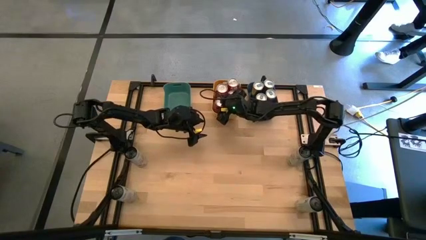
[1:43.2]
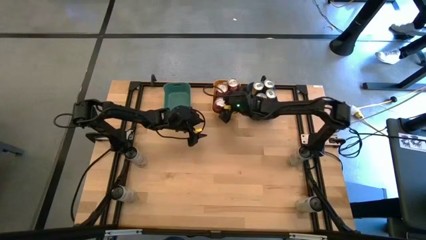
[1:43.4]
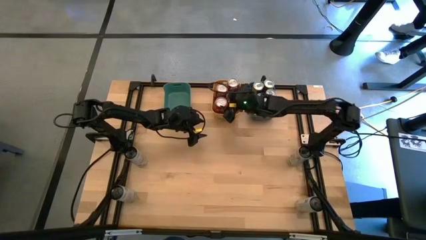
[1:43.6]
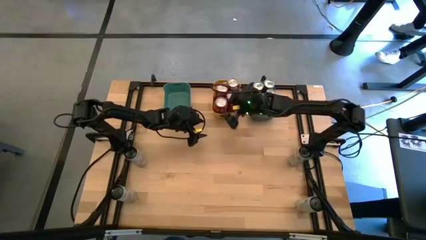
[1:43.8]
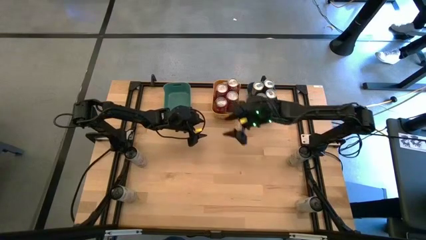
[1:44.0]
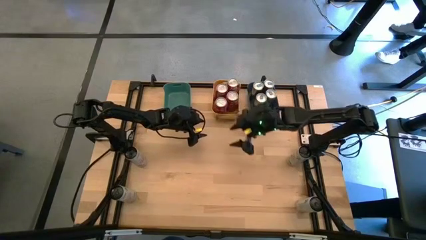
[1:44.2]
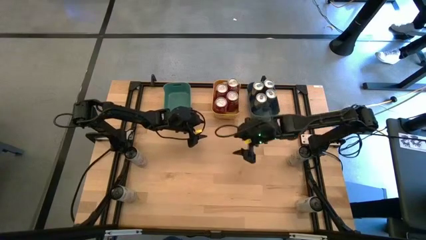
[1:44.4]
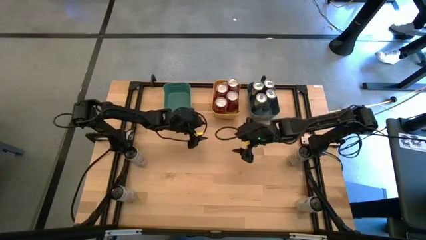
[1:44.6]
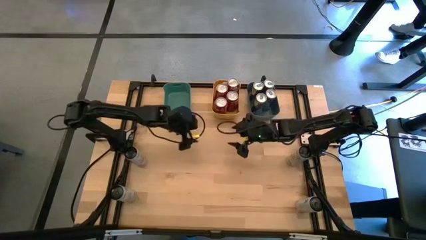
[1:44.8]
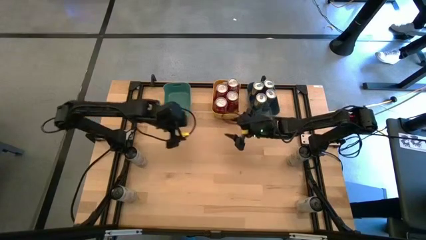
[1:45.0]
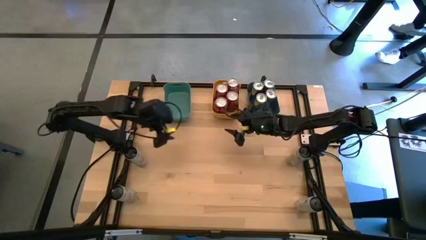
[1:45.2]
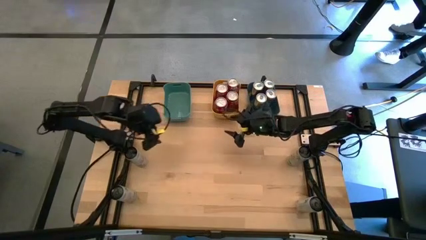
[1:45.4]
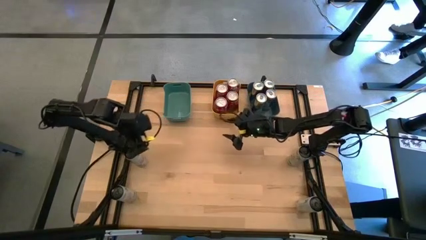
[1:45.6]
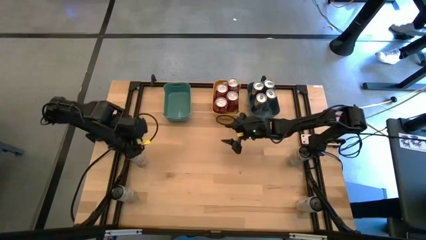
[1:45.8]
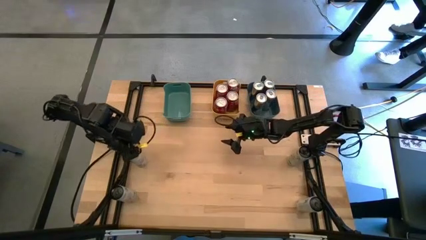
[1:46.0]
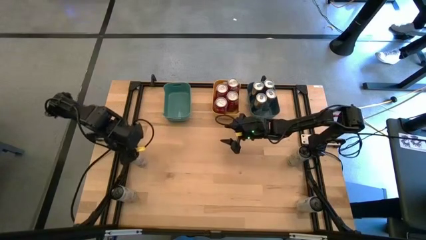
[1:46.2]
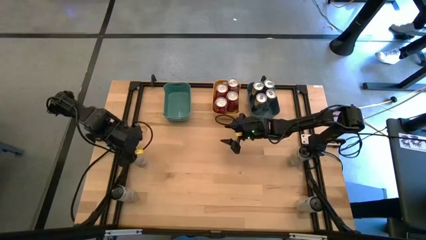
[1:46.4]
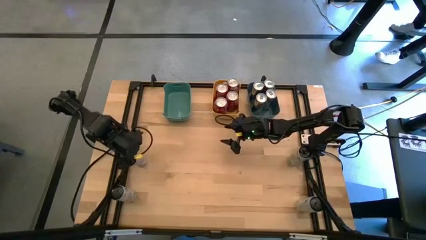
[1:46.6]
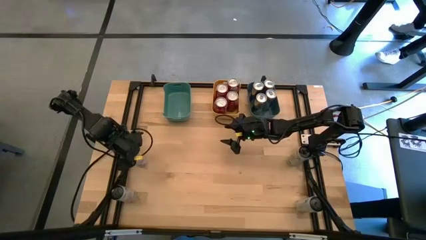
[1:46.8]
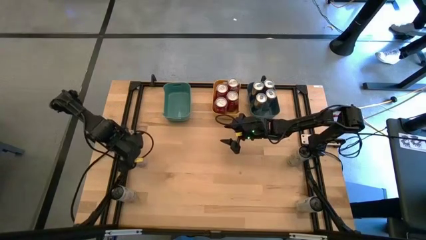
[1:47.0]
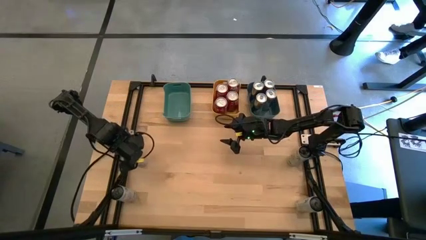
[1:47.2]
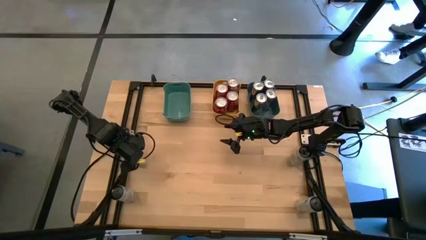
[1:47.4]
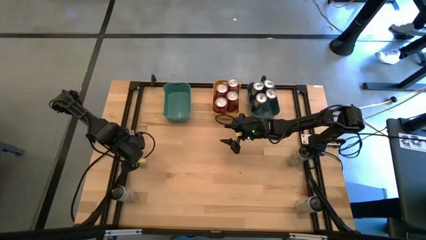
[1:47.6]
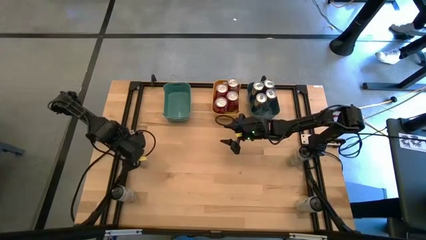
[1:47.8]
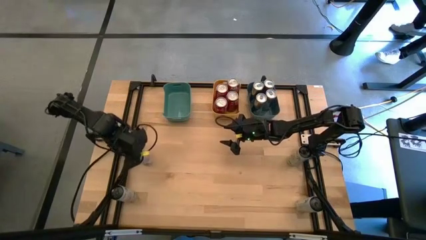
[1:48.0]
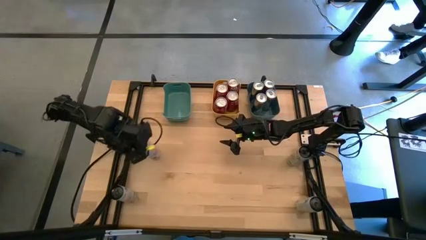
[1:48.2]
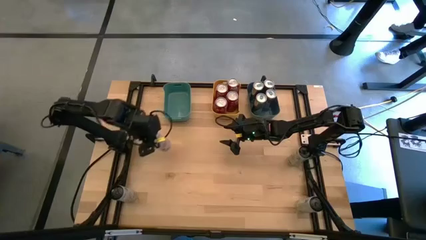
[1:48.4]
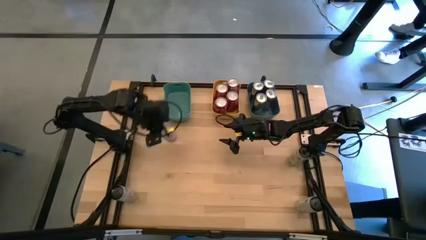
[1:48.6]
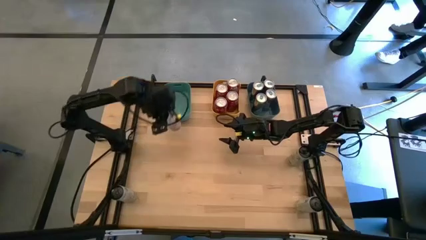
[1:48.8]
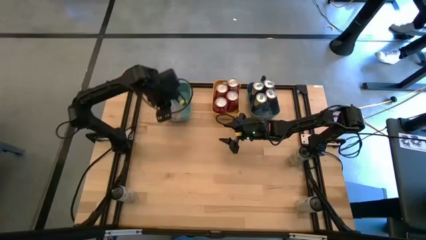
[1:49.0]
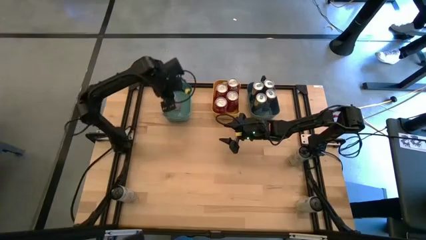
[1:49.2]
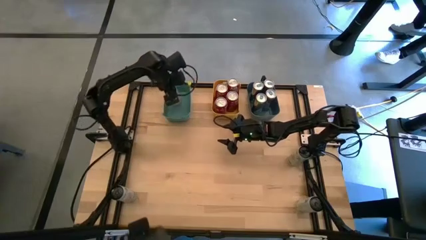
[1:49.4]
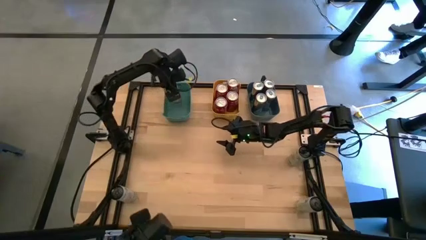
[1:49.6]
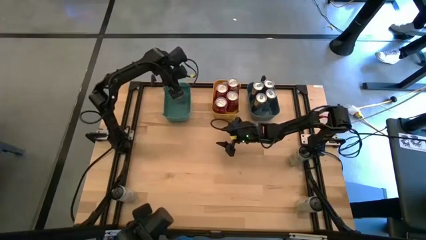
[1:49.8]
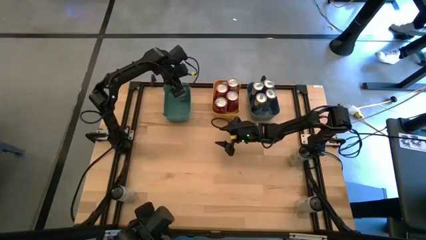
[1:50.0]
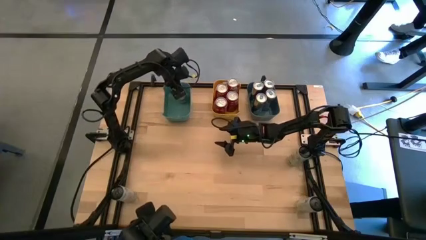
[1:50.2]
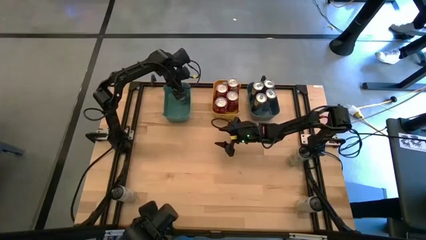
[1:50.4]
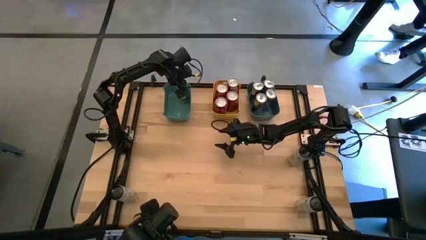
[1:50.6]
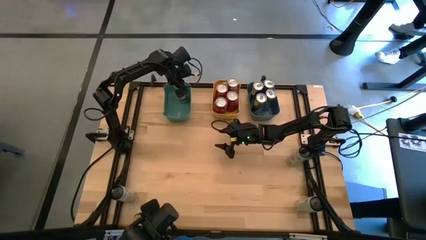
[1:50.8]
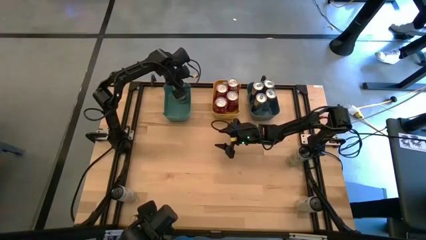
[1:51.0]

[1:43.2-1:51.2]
Task: Sort soda cans
Put the top left white pink soda can into the green bin

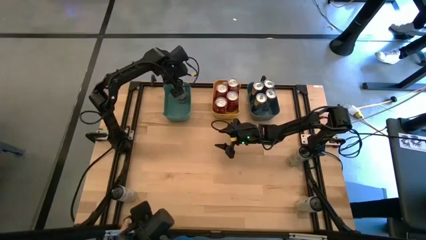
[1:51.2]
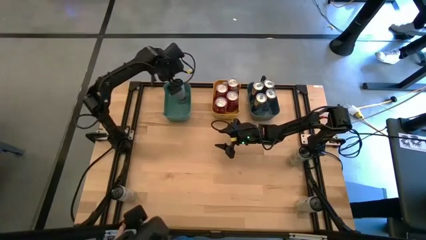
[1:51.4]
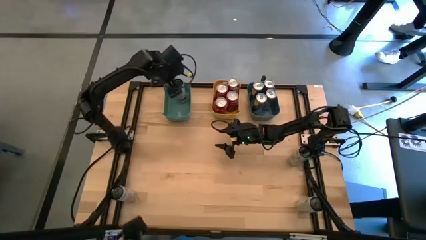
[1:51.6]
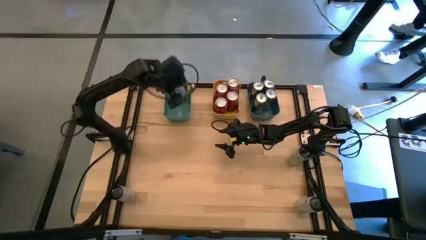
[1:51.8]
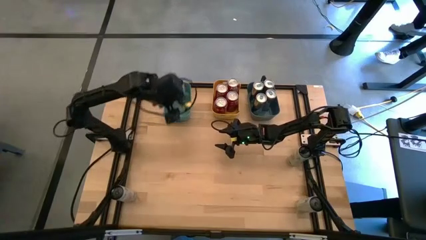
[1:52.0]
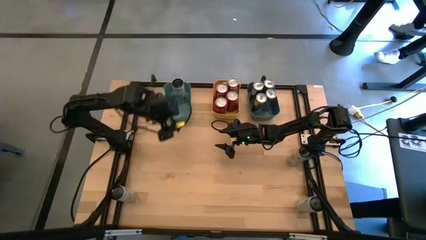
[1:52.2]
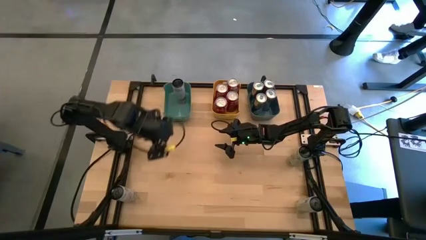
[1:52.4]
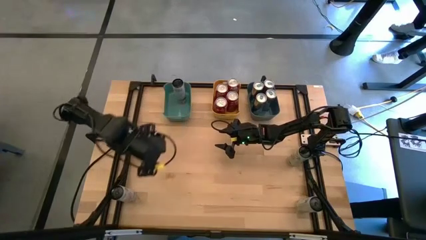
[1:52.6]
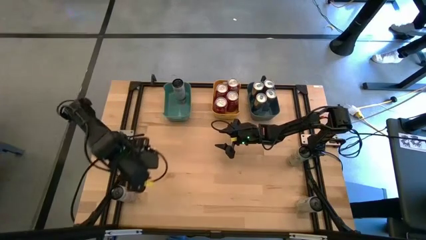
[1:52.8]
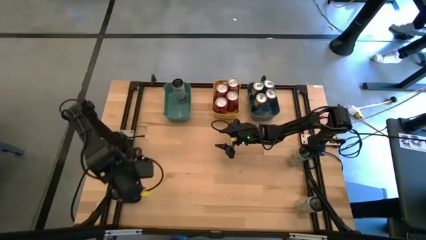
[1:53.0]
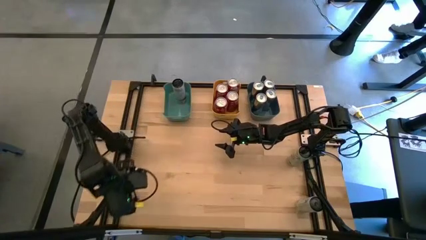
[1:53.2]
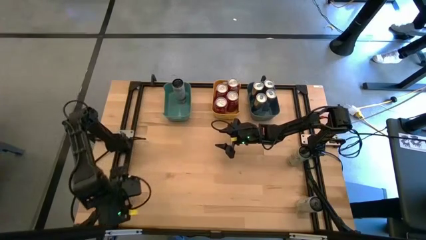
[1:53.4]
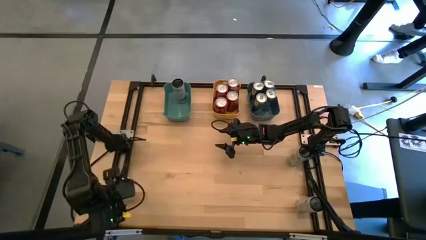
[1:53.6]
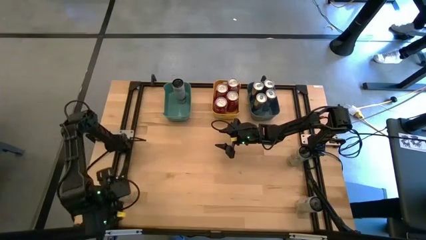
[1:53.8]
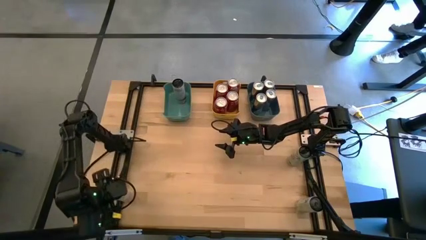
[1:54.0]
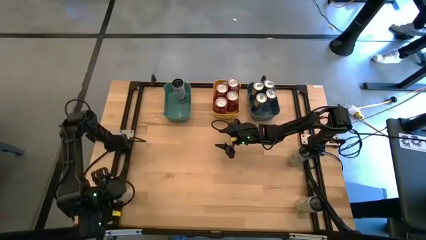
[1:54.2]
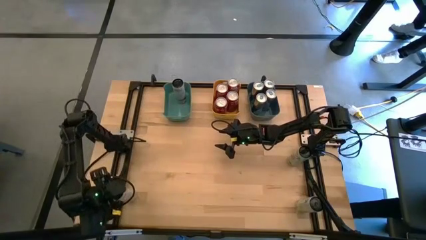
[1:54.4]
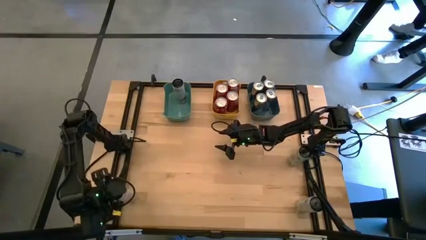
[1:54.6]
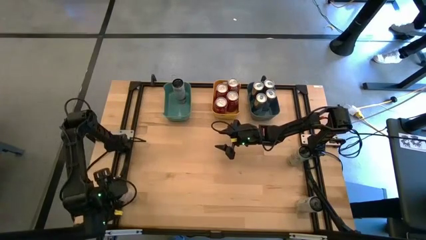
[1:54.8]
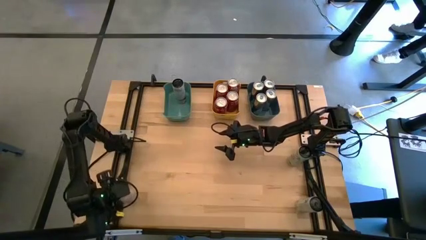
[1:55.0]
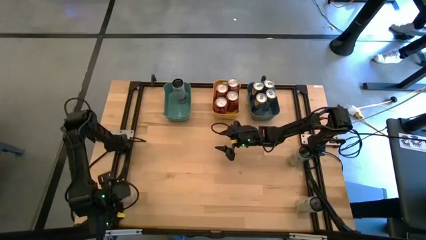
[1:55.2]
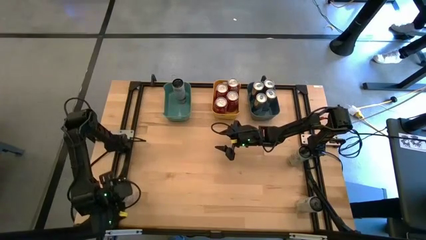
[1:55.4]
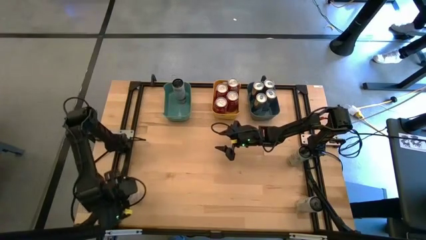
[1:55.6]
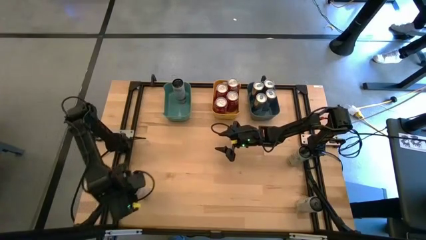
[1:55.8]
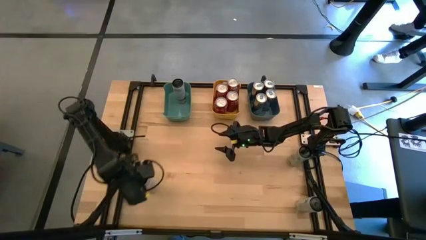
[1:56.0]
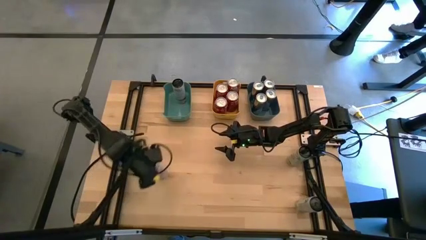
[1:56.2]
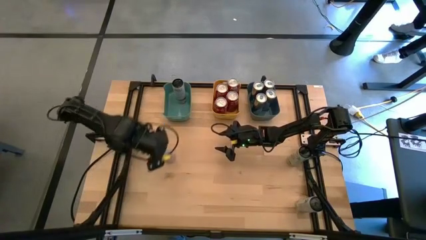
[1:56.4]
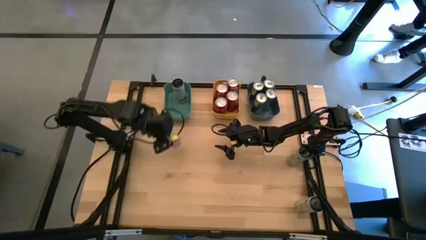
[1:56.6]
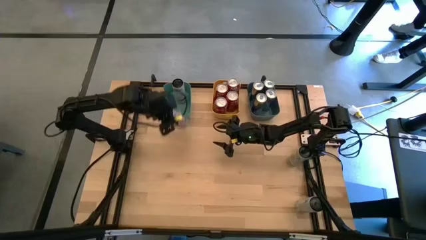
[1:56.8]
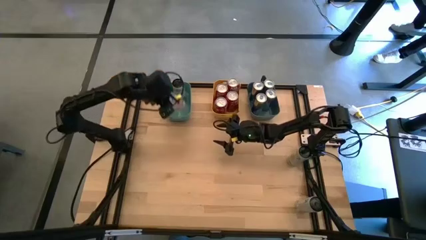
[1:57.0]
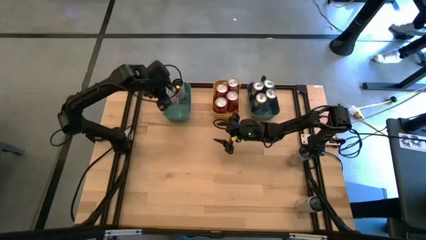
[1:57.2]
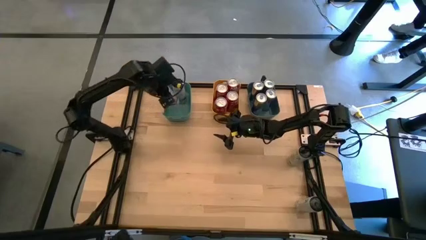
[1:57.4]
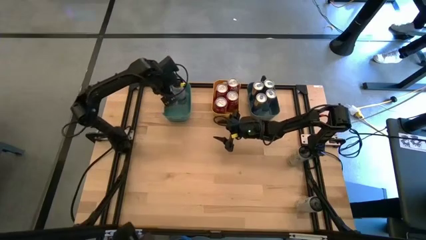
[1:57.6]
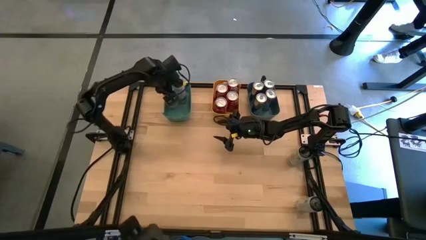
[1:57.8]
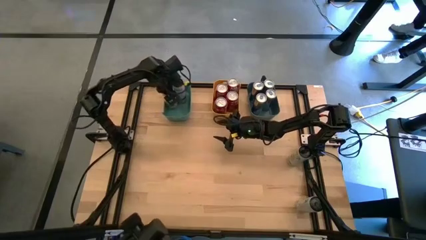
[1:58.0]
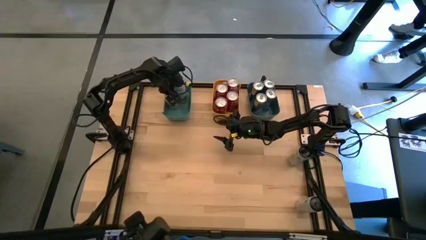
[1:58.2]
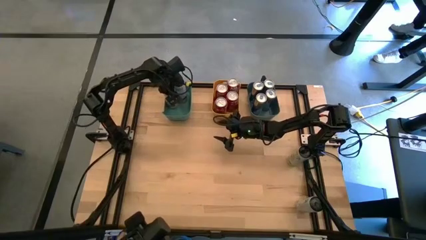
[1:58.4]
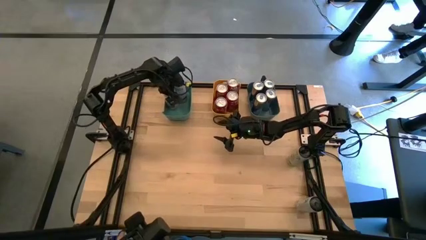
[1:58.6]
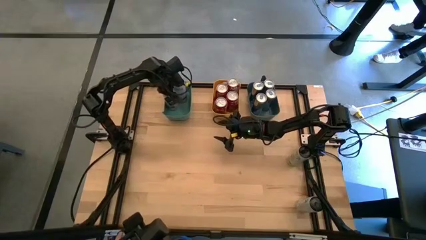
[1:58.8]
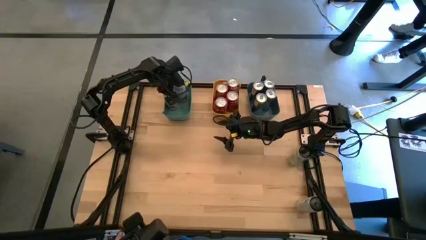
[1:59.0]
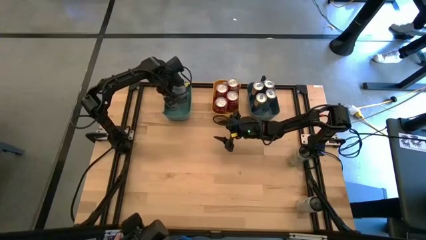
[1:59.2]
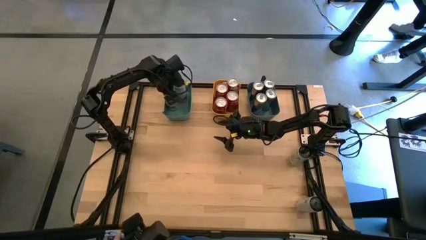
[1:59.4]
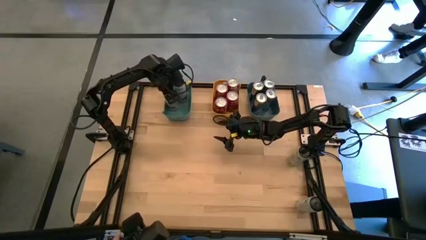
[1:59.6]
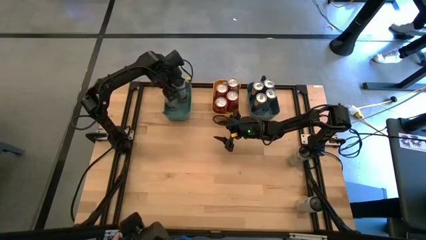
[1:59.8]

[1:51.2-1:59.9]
Put the bottom left white pink soda can into the green bin
